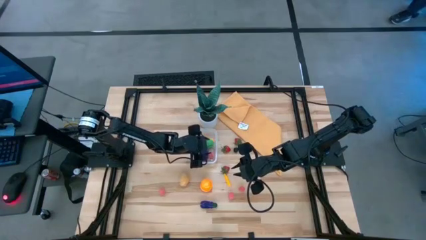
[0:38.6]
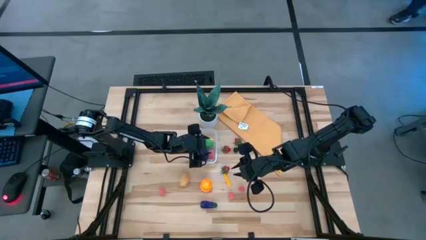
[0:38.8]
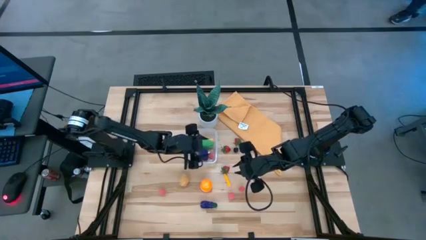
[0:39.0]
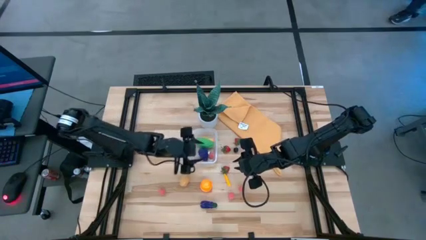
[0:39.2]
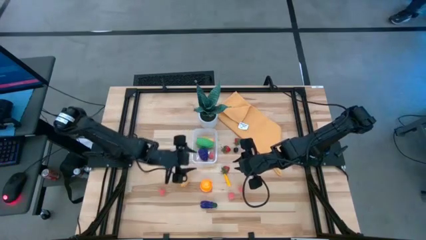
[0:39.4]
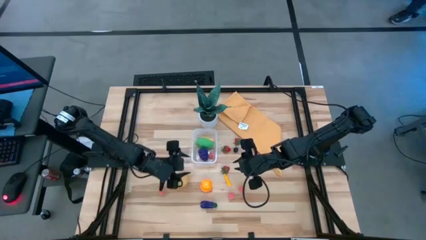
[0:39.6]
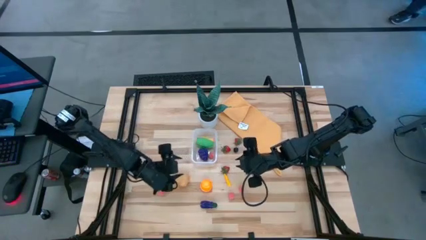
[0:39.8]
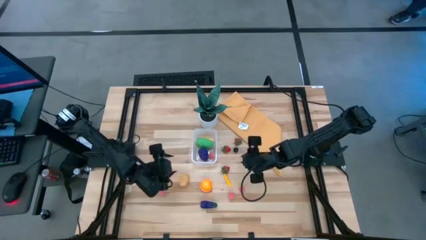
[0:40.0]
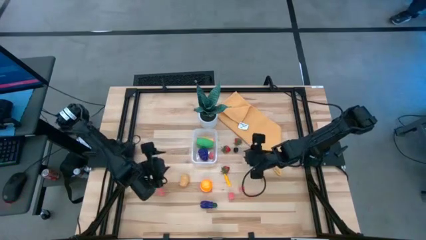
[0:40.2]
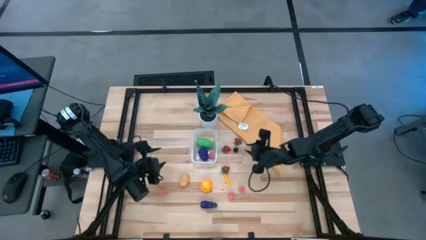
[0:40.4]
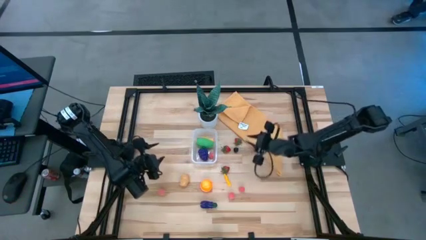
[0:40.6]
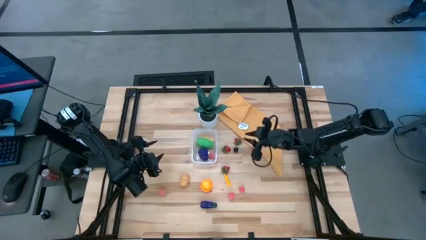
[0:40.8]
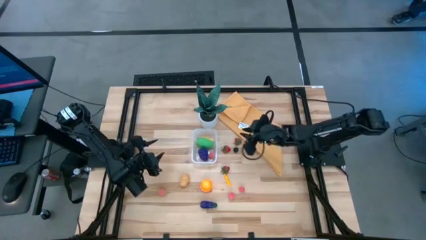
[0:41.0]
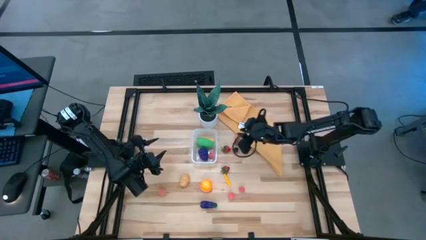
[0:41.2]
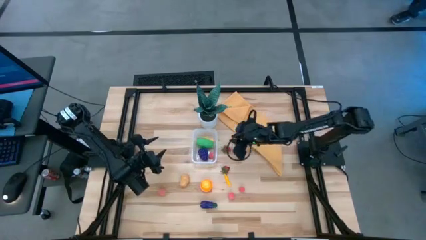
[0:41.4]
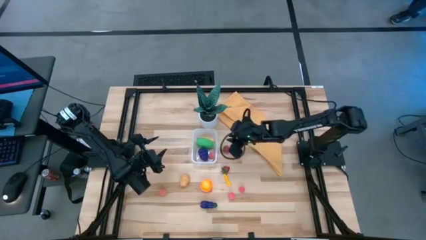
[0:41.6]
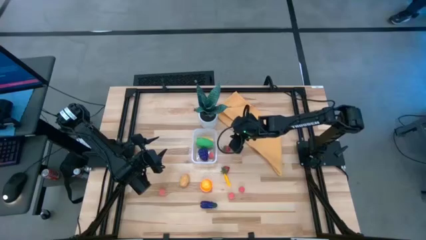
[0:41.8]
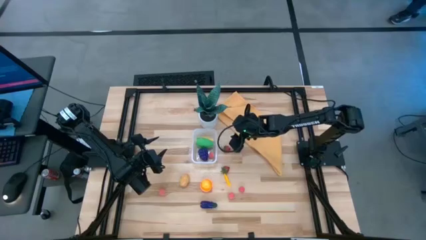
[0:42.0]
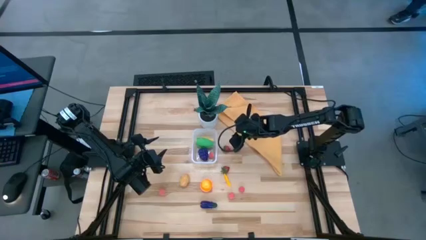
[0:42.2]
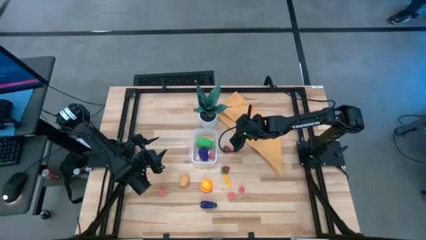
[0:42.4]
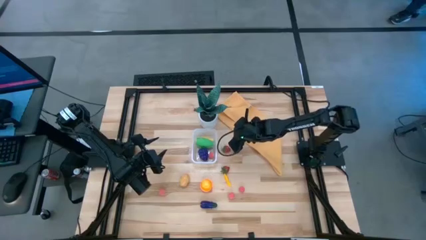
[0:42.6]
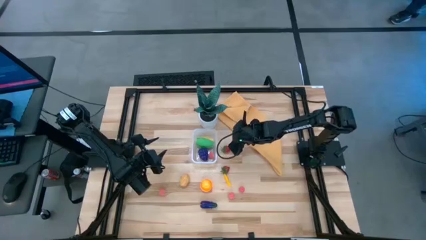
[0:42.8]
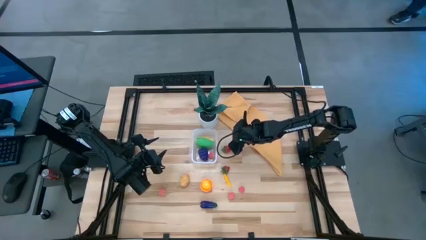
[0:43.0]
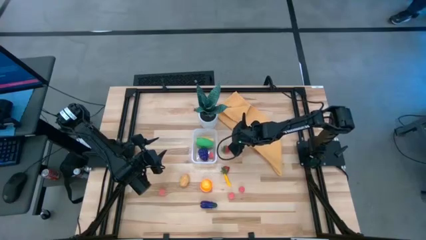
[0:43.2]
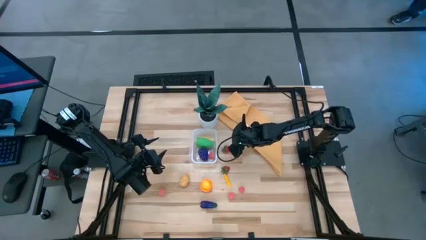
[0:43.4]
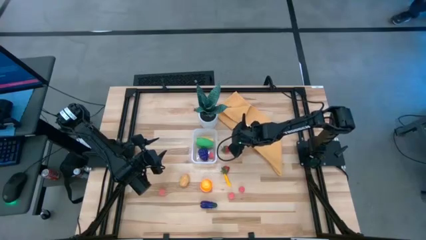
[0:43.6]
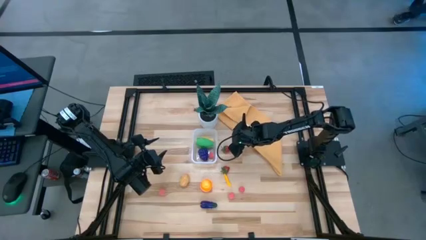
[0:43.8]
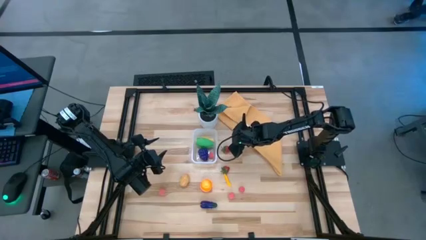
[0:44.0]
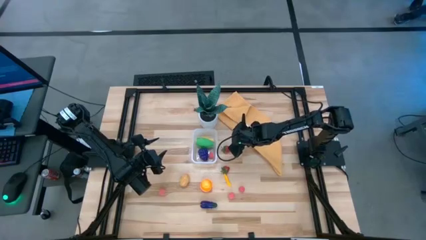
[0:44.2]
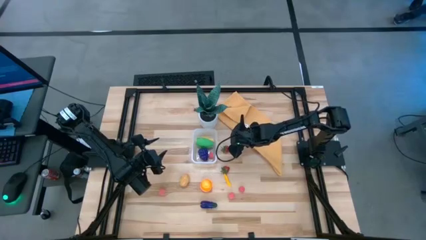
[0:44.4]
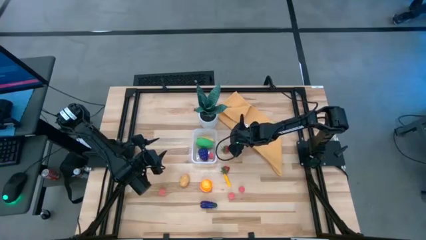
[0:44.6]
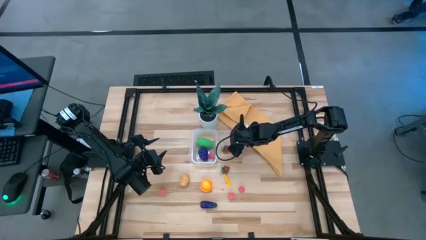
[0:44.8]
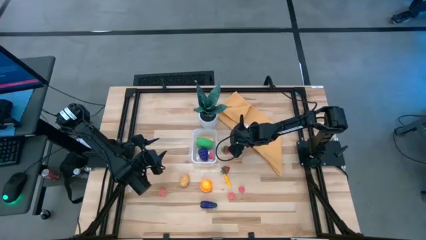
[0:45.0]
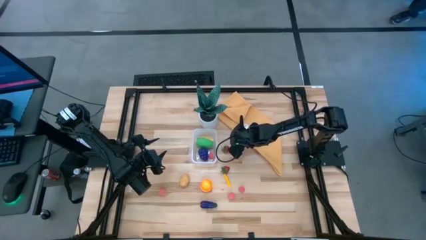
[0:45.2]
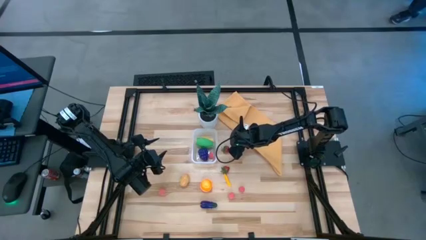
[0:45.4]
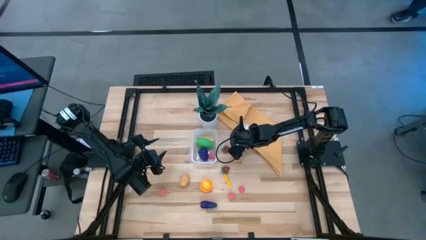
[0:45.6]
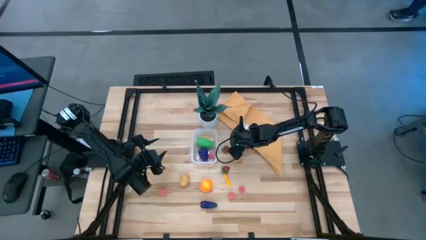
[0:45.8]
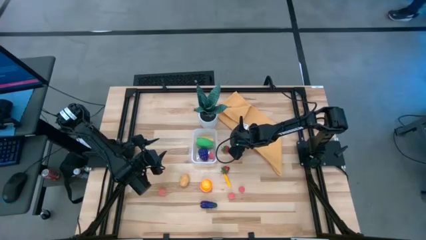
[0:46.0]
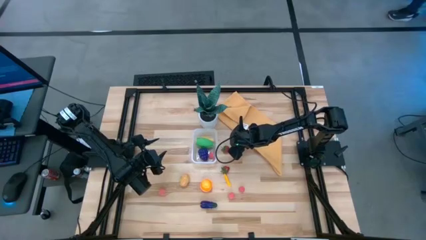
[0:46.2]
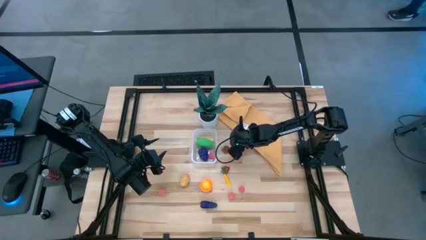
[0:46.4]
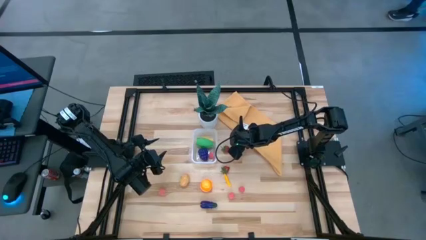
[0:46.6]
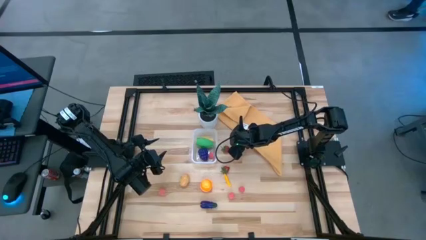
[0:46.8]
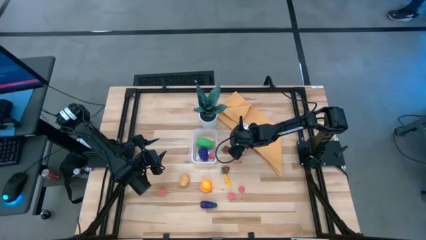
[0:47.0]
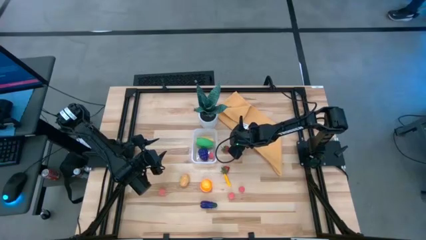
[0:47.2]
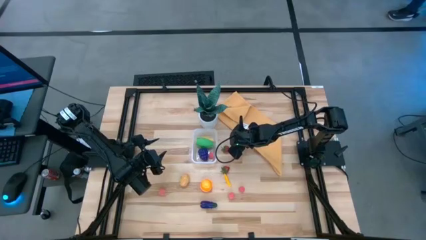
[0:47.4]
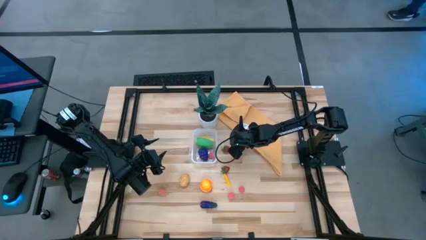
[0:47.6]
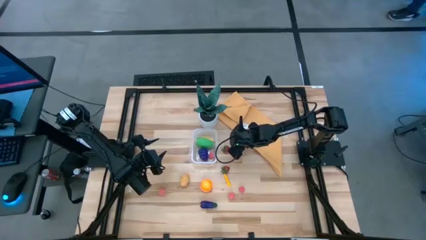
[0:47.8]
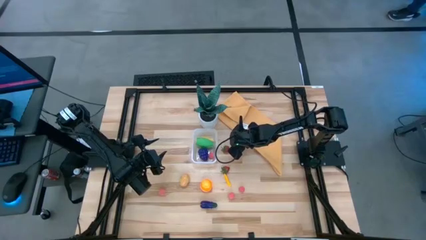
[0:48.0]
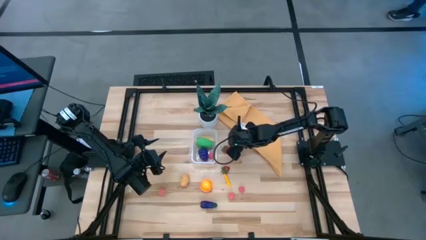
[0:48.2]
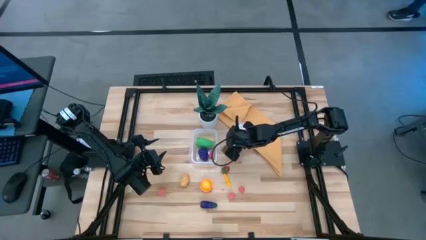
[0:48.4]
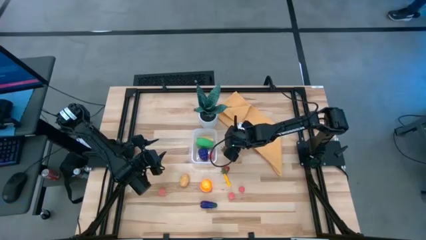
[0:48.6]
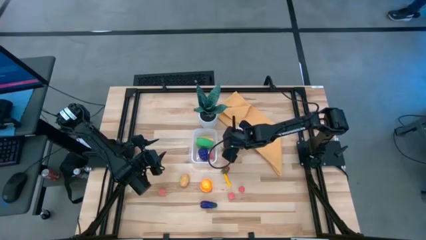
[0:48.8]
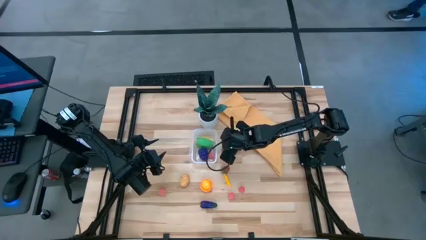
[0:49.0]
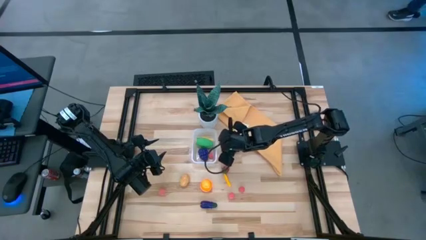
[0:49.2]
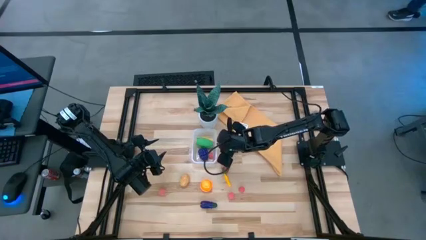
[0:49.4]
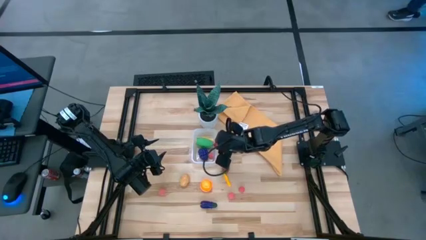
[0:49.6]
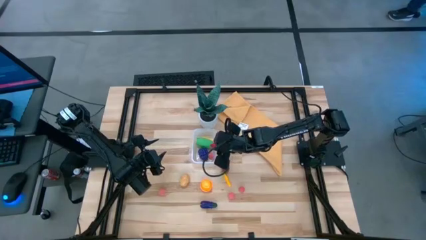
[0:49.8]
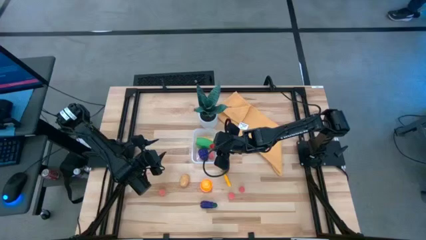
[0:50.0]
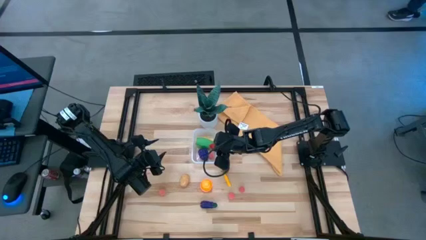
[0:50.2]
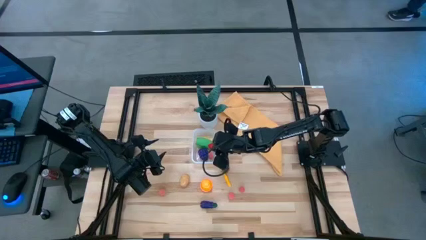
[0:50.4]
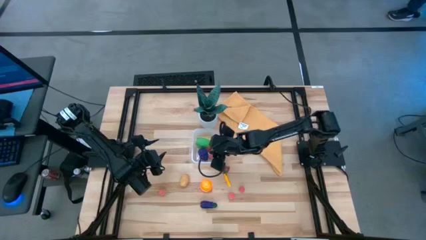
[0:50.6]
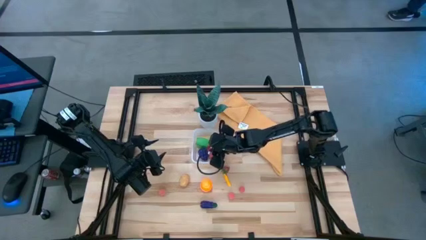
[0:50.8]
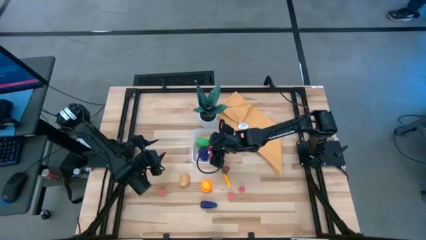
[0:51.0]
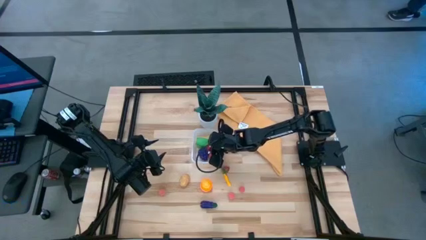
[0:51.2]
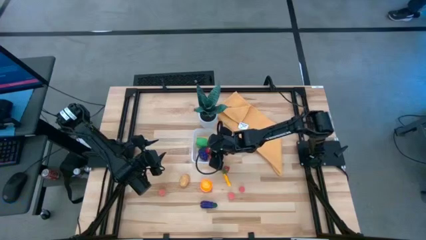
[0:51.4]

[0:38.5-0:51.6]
Task: Pick and placing Produce into tupperware
Put the top right strawberry into the transparent bin

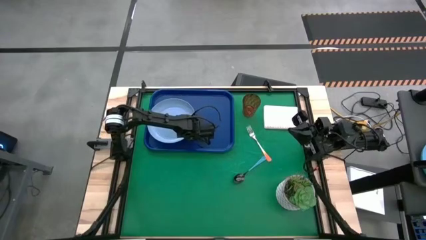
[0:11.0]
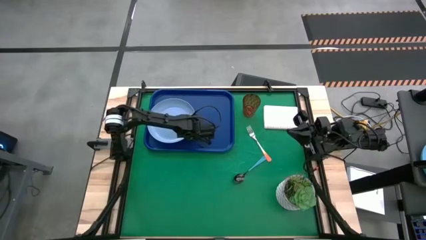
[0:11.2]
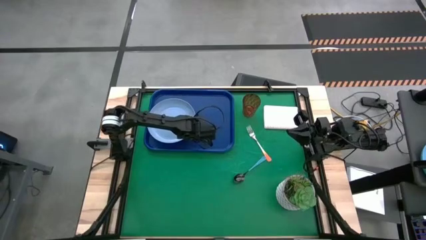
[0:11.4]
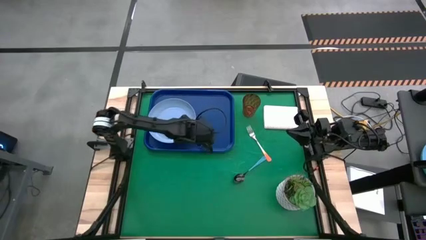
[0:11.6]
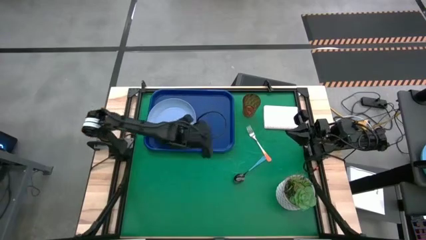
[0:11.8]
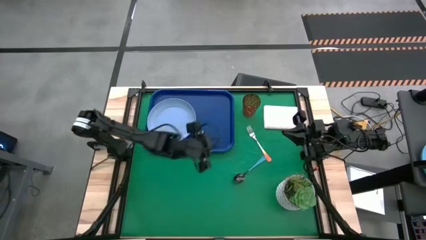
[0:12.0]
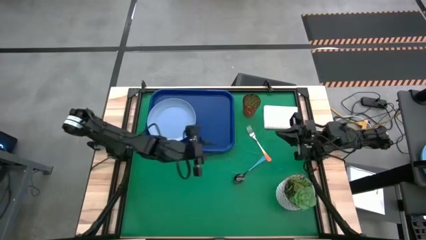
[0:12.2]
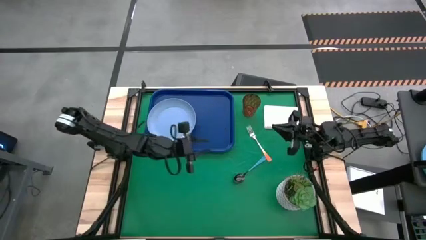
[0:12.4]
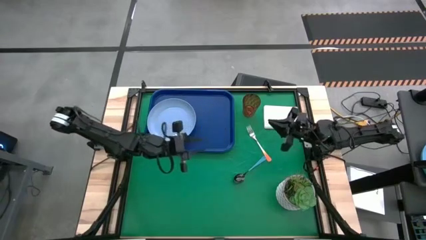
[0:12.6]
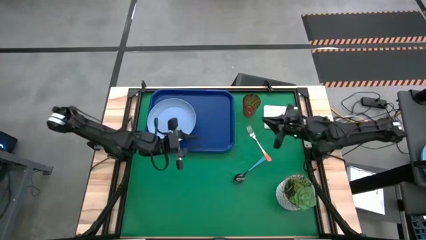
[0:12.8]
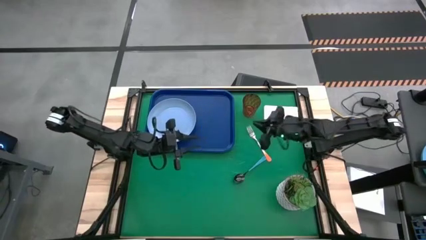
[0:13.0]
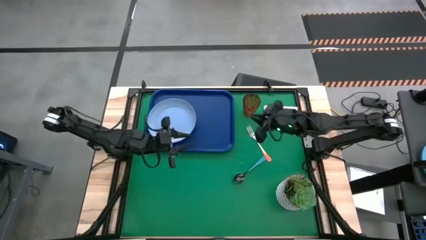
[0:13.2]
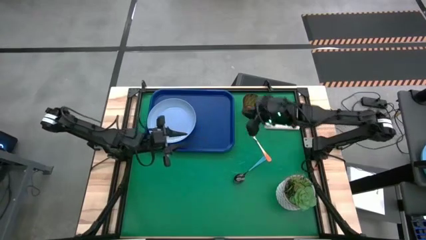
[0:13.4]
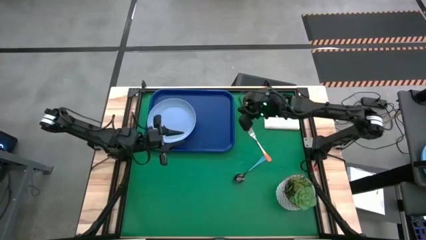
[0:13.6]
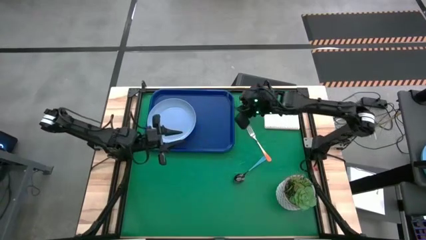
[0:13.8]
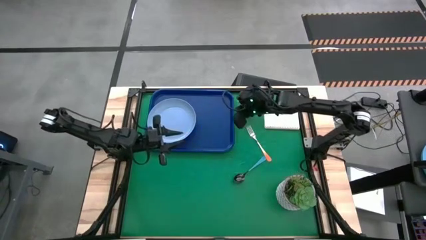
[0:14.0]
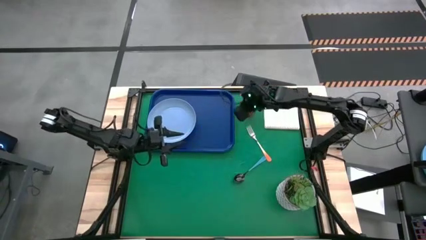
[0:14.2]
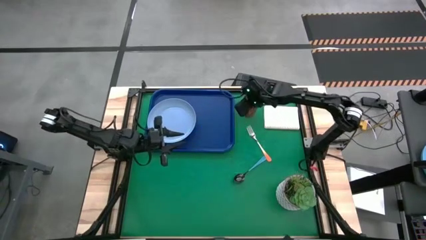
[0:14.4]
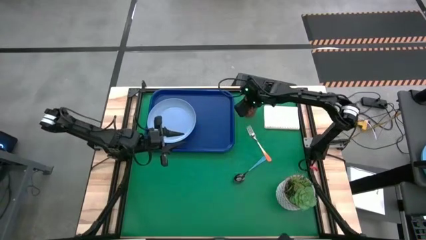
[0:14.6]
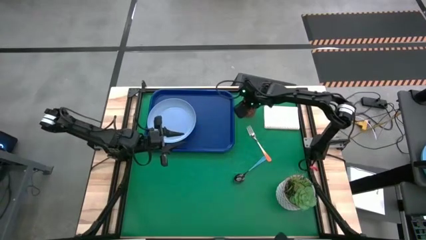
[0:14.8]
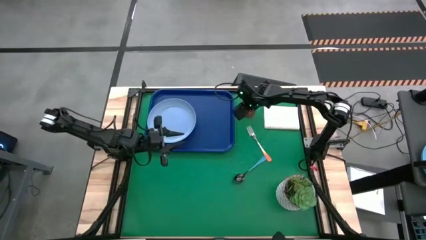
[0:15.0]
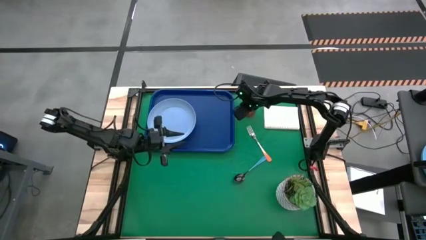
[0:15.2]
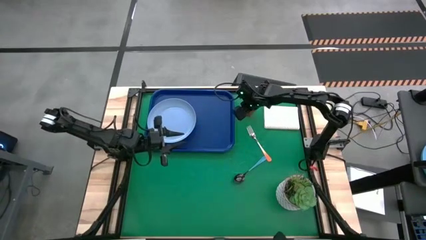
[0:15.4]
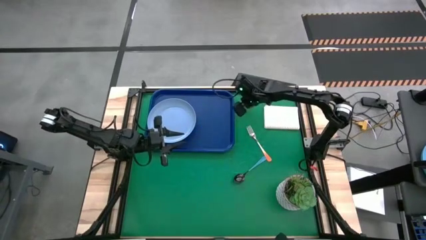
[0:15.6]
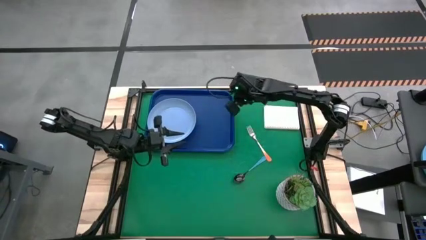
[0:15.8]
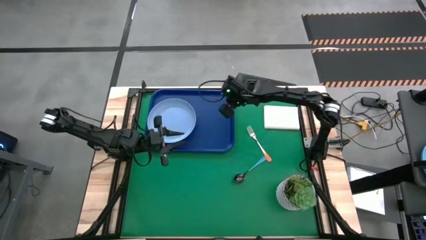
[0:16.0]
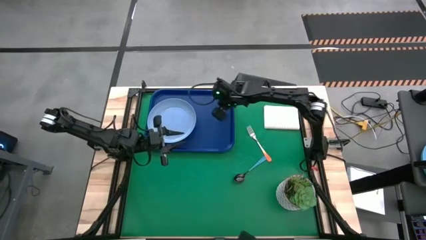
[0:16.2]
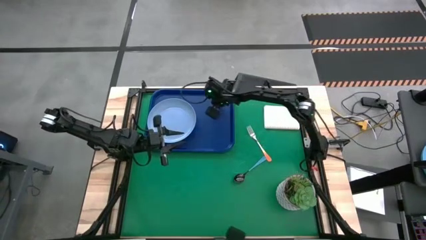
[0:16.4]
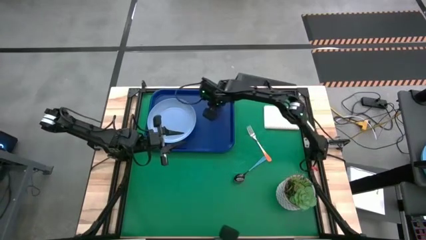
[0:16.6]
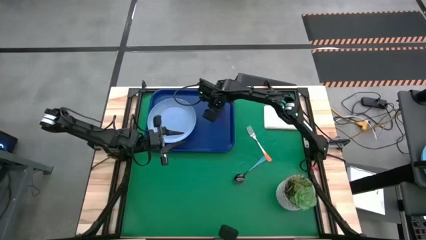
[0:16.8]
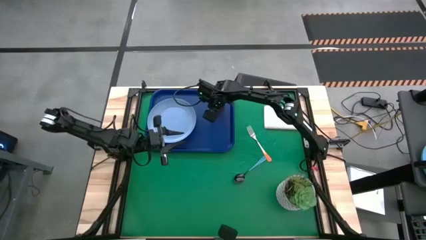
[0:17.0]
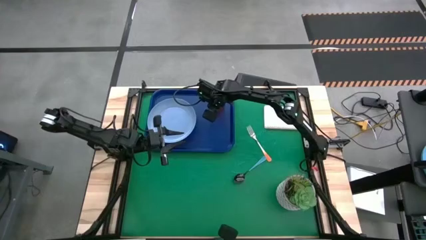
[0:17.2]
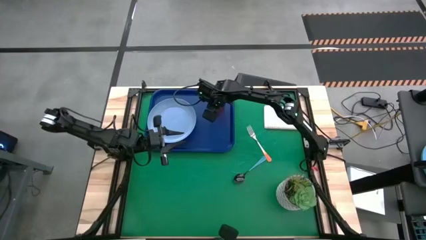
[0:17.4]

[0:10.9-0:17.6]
Task: Pick and place plate/cup/fork/spoon on tray
Put the brown glass on the blue serving tray to the top right of the blue plate
